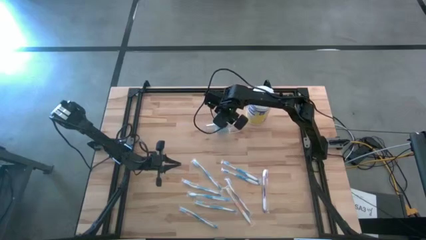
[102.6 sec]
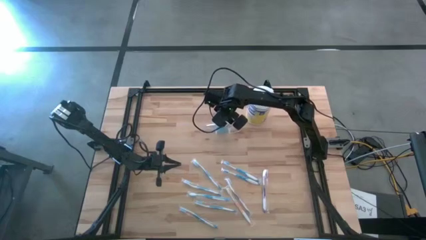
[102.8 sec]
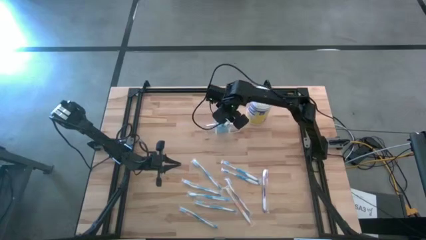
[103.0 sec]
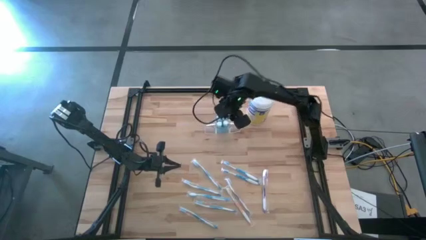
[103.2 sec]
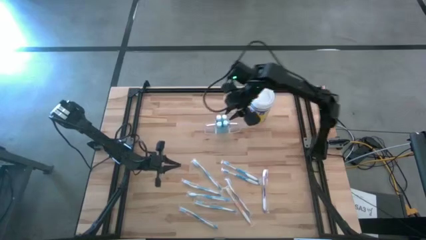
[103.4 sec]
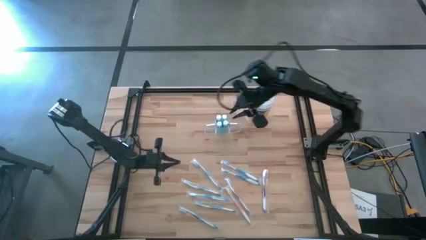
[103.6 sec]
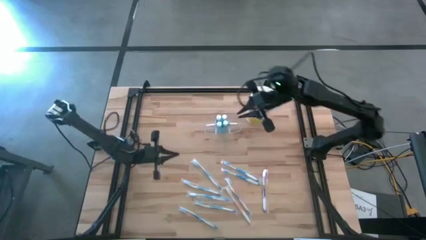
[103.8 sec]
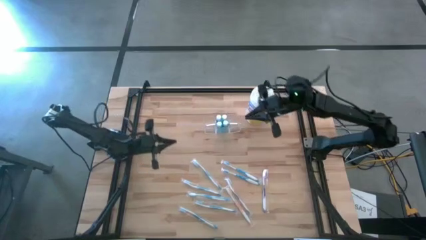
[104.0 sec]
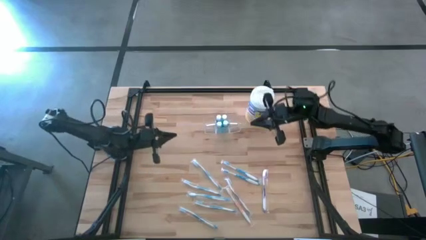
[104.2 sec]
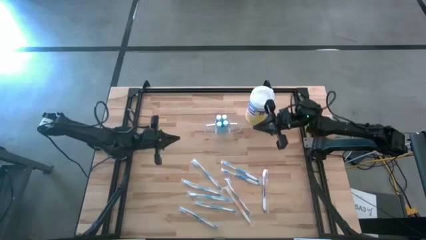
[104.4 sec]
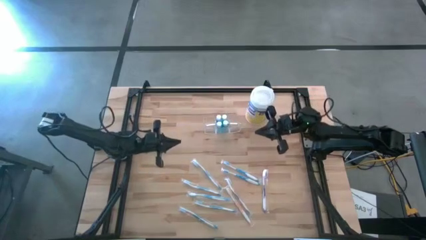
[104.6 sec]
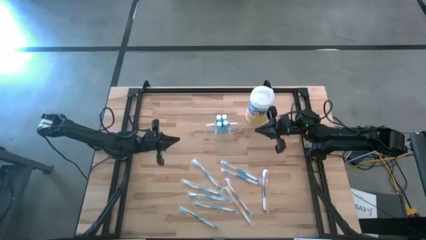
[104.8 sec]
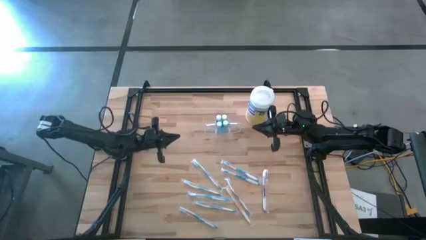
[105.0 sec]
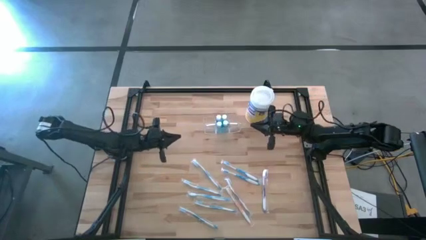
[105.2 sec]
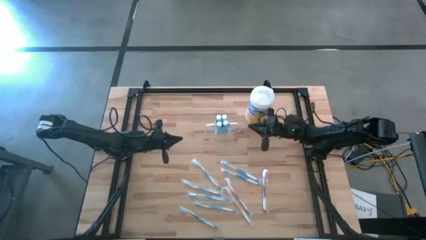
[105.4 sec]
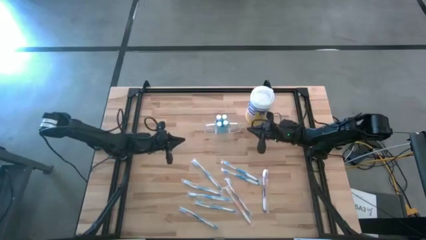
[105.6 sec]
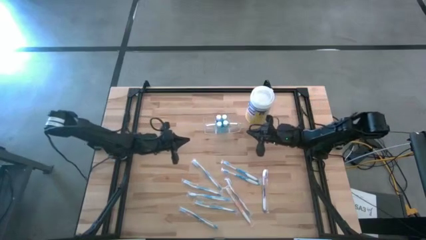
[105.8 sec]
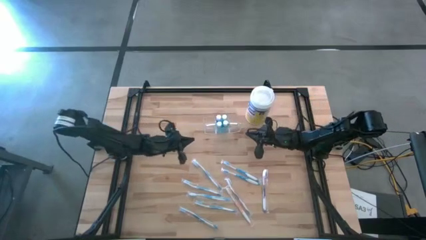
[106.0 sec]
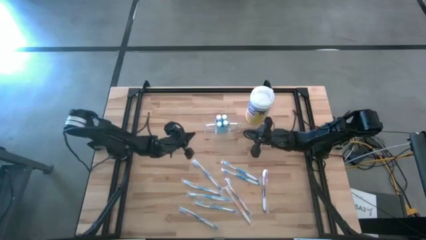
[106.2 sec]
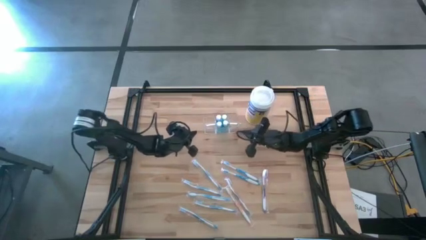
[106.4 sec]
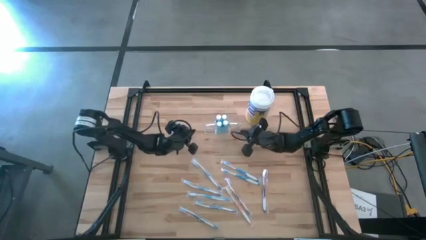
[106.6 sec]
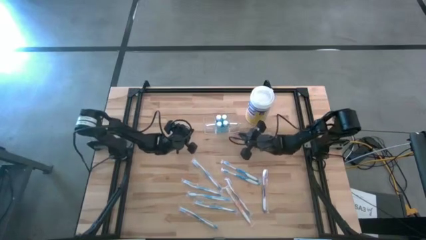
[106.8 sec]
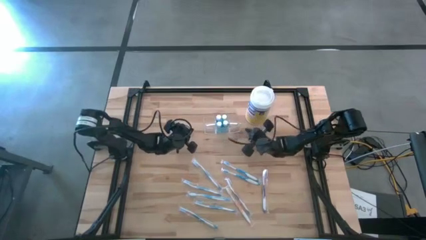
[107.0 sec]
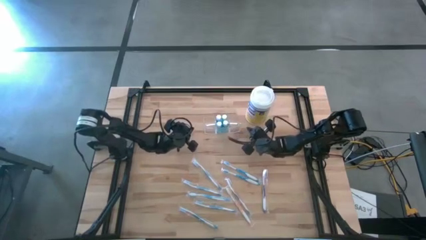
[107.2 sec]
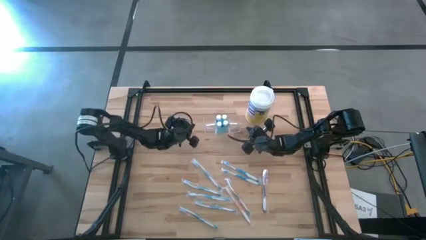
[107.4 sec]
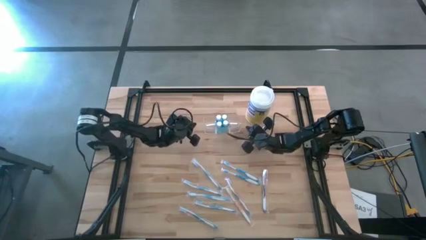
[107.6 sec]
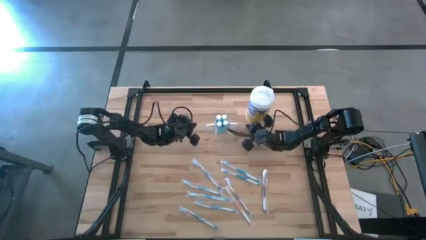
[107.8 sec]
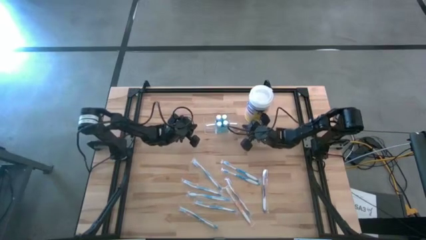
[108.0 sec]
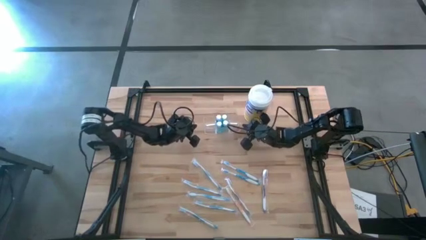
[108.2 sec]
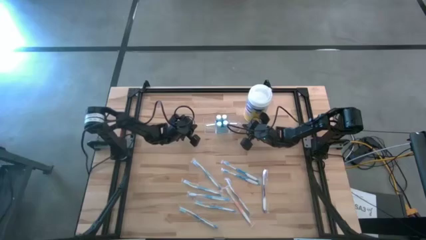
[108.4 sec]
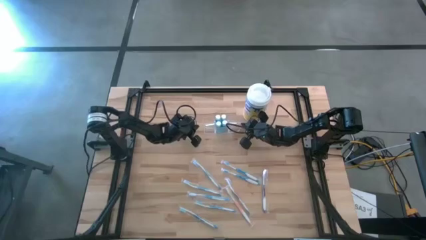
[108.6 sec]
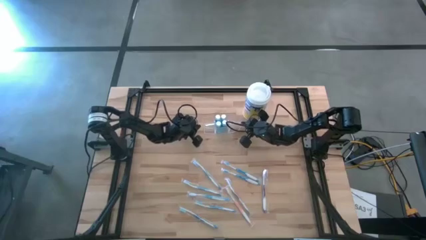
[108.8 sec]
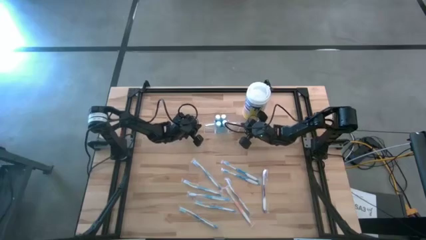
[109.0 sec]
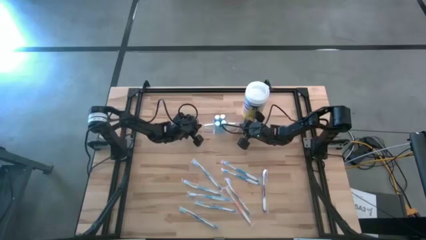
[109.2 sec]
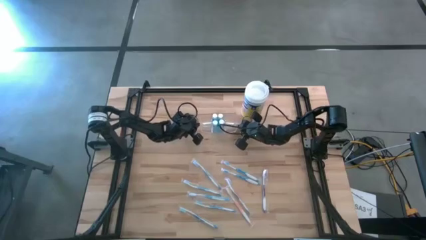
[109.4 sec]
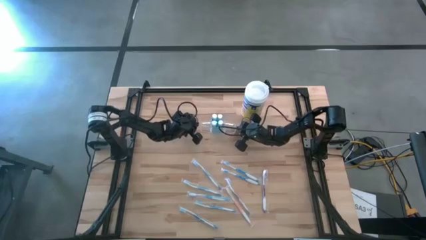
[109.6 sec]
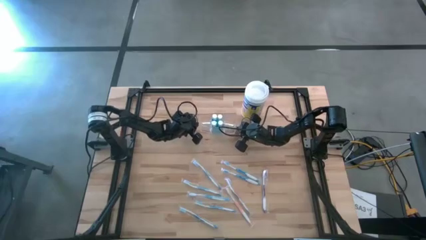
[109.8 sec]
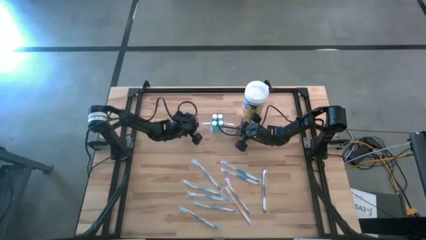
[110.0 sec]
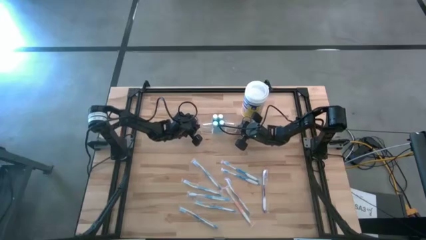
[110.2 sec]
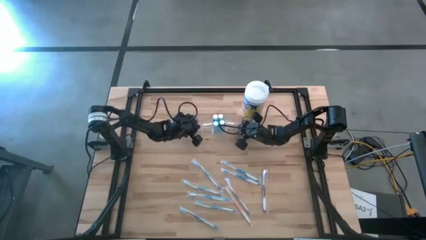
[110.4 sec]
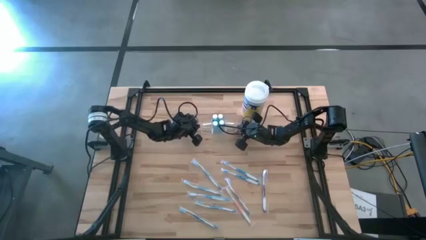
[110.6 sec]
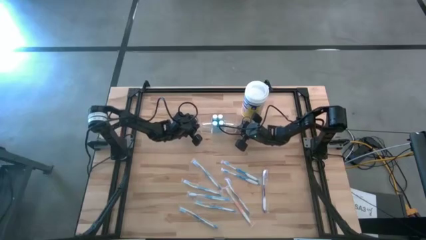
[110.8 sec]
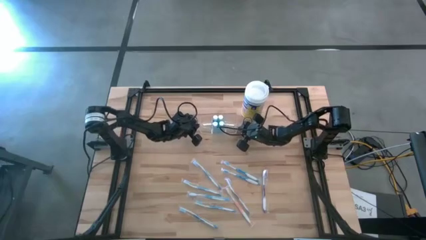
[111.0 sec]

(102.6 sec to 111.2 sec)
Task: Pick & Place toothbrushing station
Adjust the transparent organizer

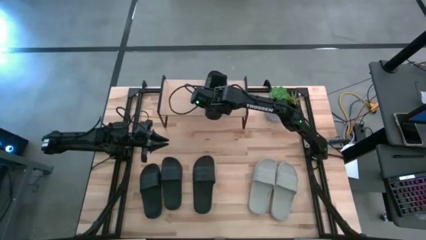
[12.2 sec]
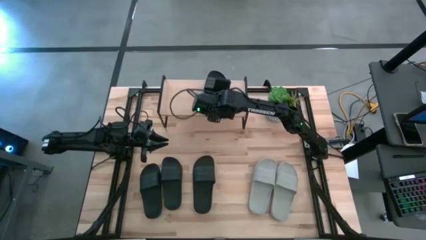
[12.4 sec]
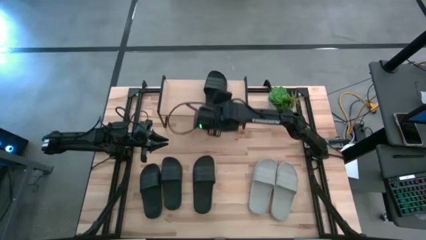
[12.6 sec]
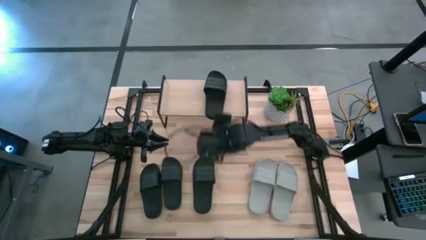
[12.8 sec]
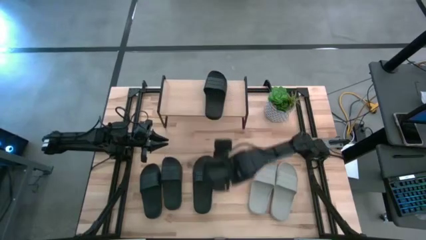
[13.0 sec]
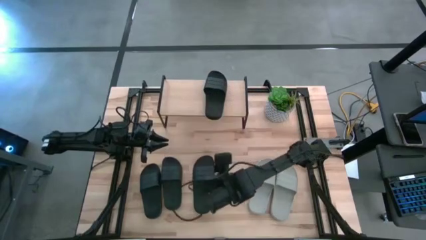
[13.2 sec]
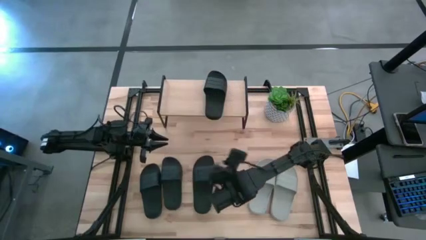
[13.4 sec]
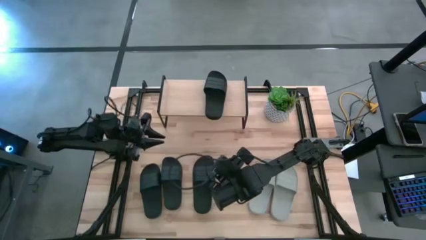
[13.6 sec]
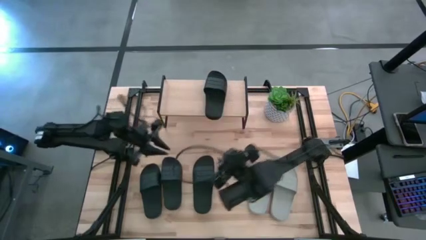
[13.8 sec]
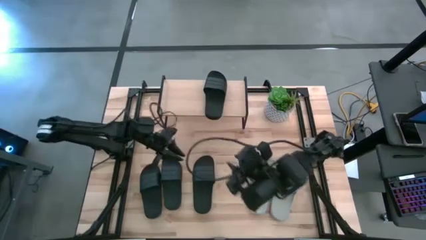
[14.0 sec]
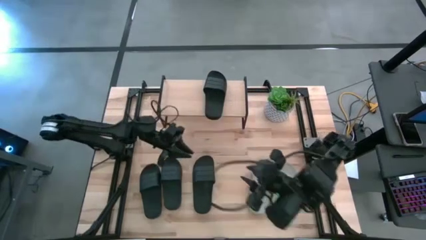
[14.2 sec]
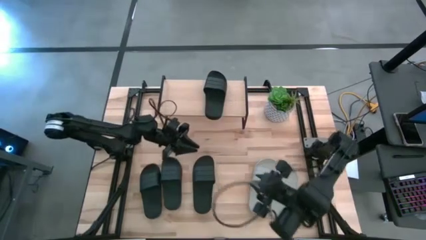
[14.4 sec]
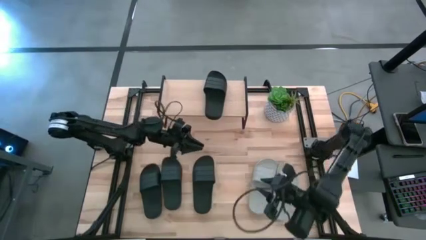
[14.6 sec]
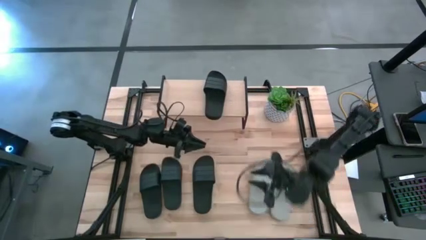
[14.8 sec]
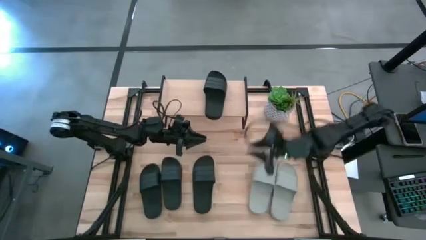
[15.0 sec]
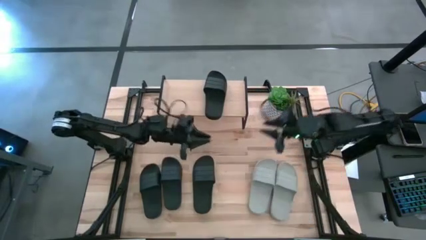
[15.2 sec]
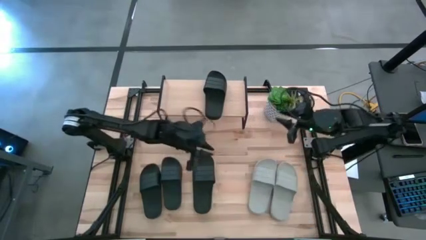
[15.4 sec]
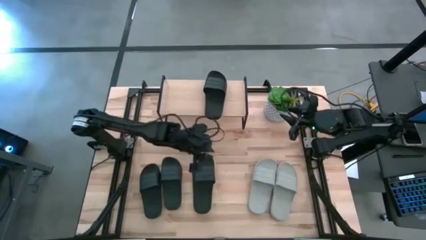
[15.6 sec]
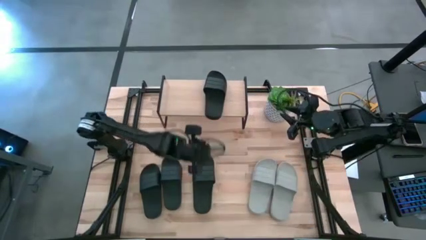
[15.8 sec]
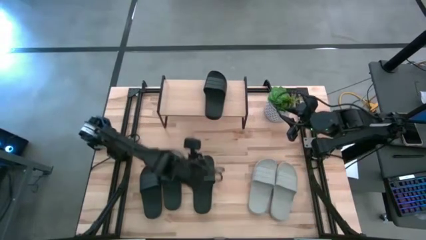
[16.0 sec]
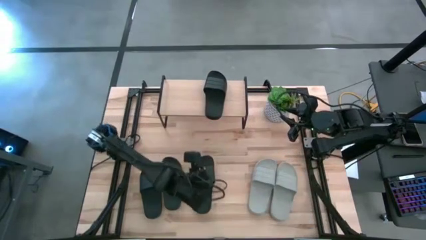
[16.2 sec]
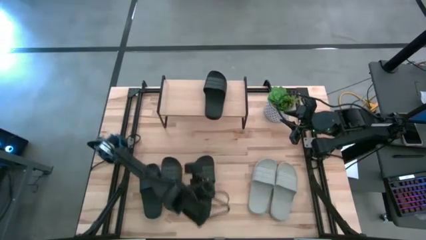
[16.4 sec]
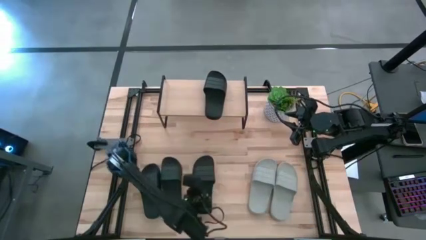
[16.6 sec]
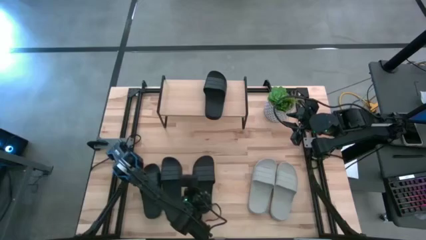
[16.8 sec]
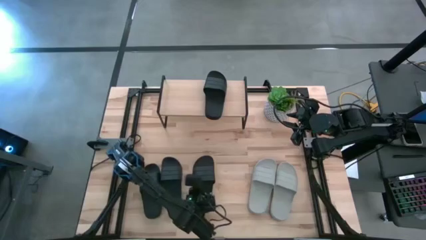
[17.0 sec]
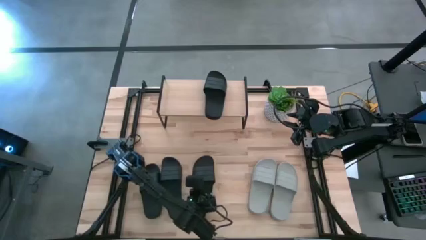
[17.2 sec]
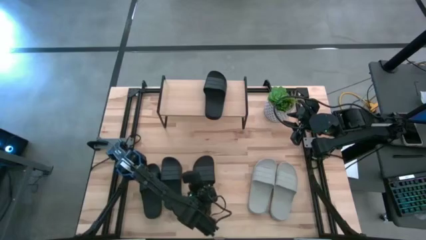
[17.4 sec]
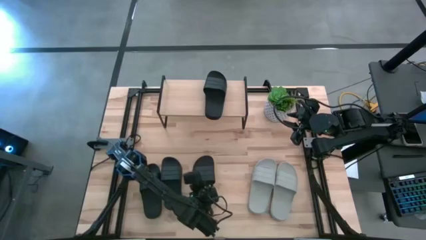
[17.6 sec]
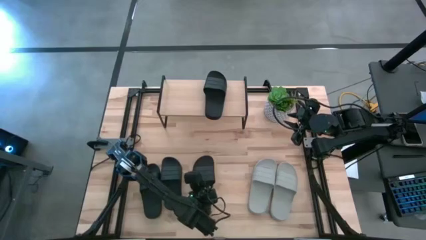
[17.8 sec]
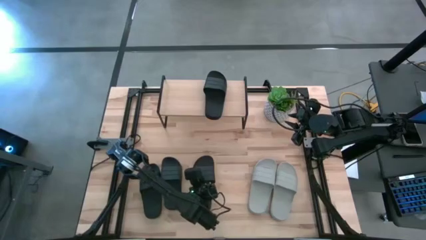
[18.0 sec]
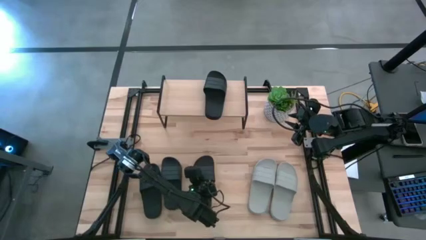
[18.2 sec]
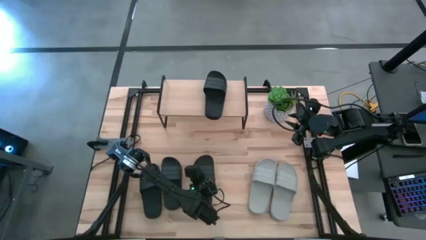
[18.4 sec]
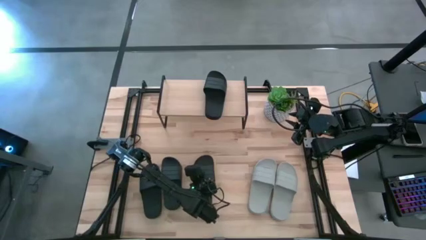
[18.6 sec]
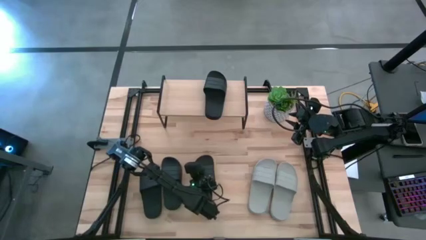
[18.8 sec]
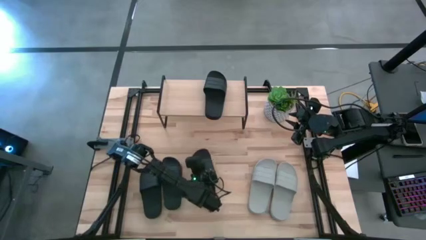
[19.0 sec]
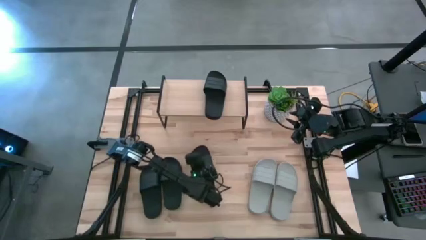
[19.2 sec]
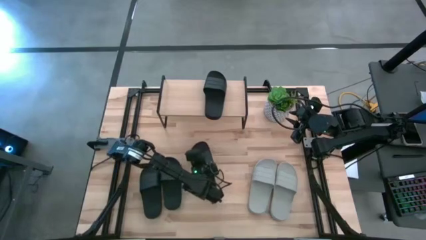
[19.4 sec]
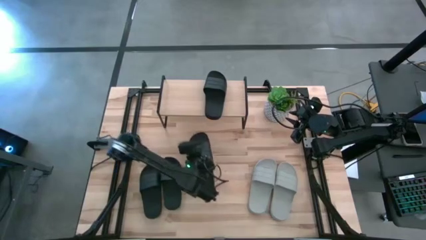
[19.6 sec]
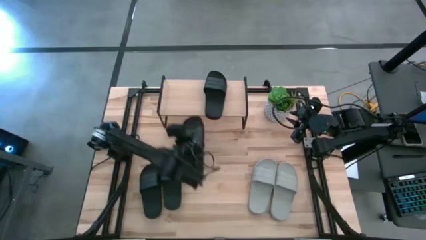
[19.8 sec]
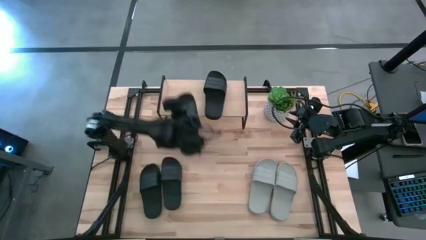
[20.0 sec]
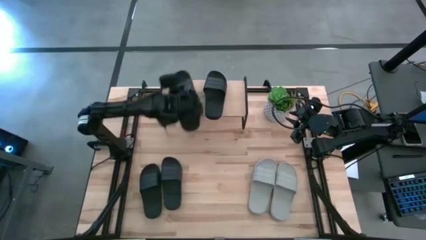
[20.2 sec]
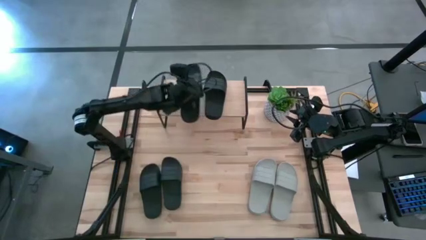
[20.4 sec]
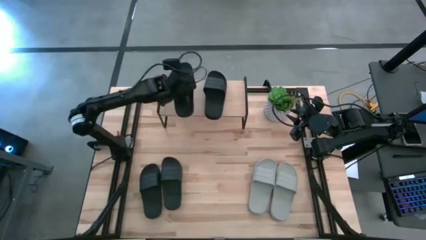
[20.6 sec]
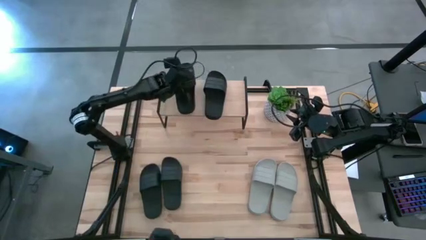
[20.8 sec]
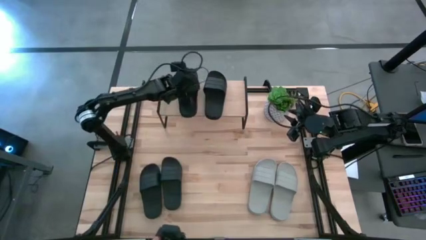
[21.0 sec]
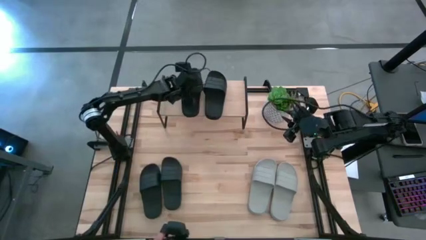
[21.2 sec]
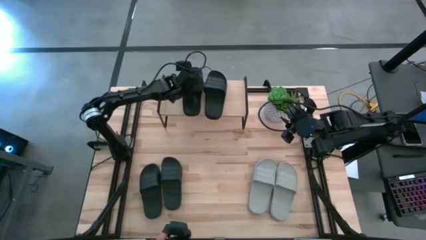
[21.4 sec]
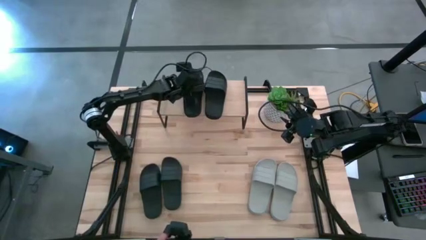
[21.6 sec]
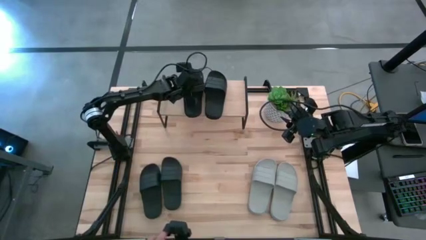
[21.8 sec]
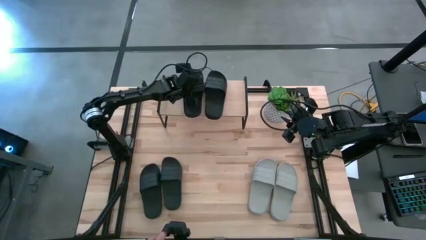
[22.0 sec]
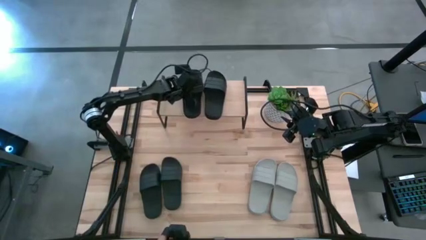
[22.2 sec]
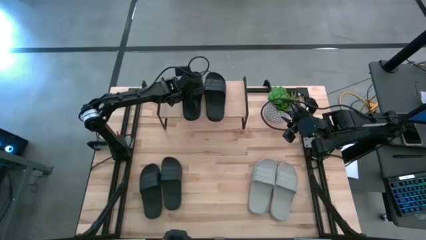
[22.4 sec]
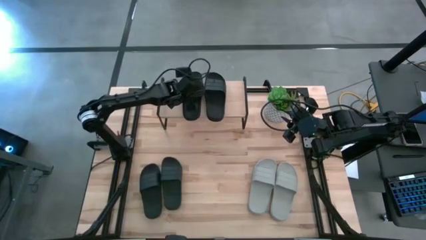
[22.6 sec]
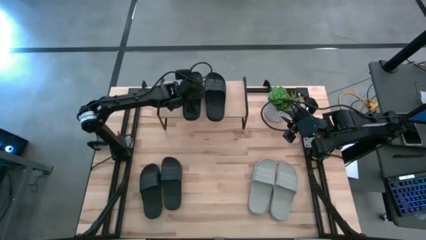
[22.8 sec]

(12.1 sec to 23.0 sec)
Task: Pick and place slides into the shelf
Put the black slide on the shelf
